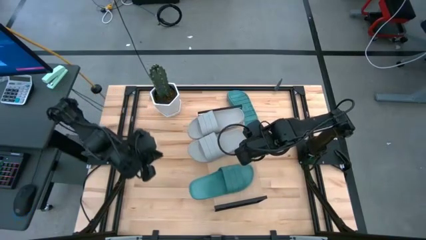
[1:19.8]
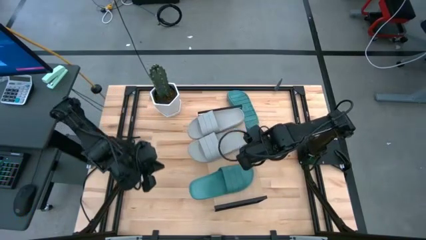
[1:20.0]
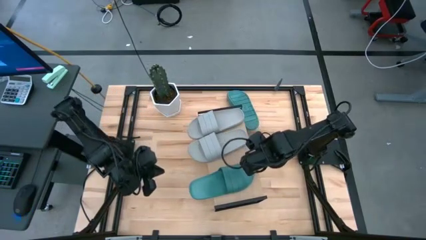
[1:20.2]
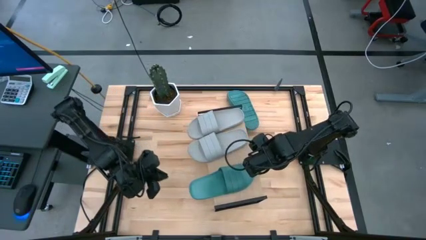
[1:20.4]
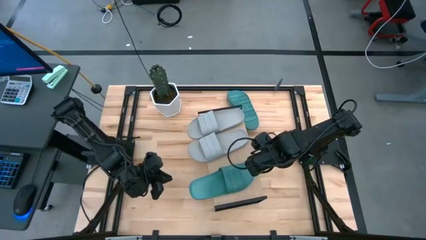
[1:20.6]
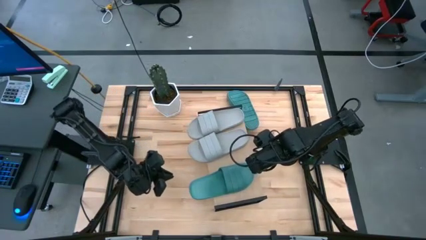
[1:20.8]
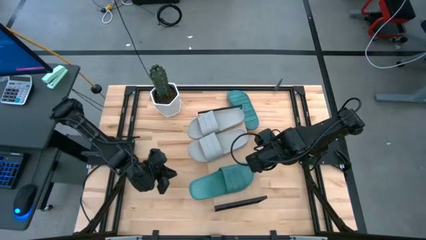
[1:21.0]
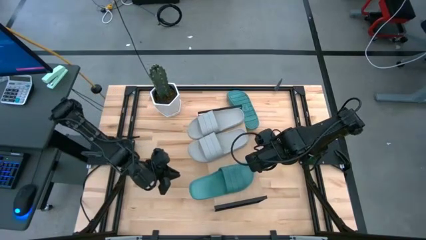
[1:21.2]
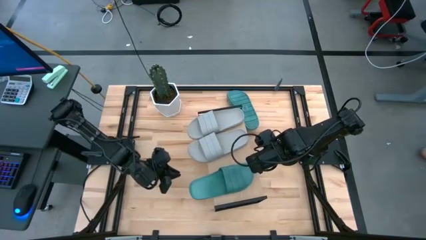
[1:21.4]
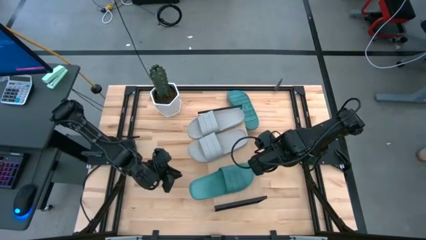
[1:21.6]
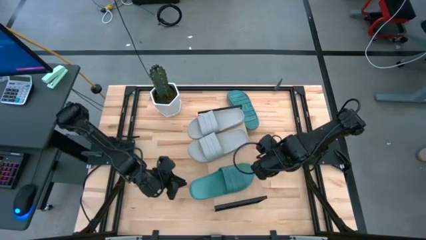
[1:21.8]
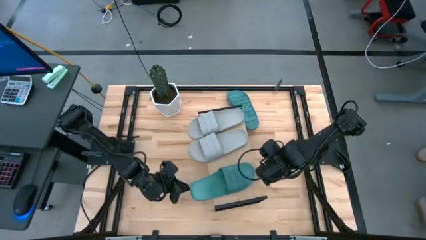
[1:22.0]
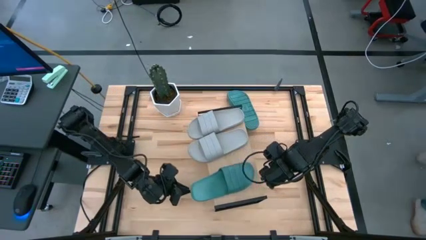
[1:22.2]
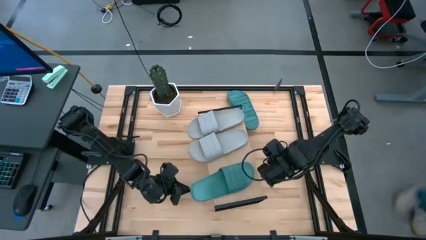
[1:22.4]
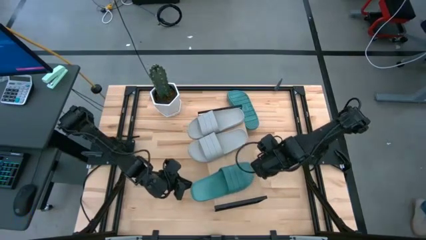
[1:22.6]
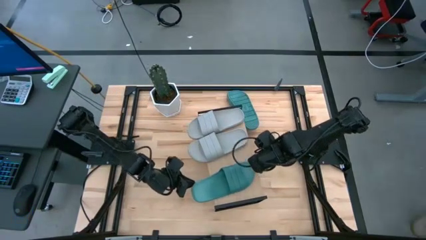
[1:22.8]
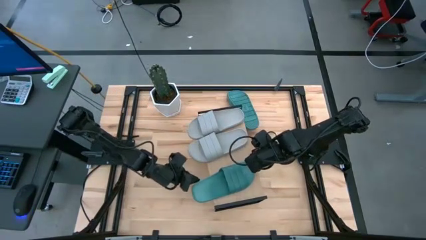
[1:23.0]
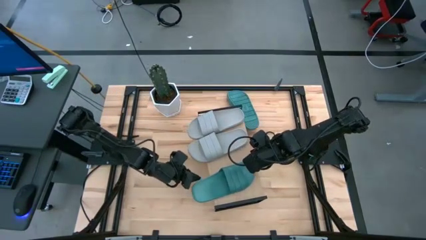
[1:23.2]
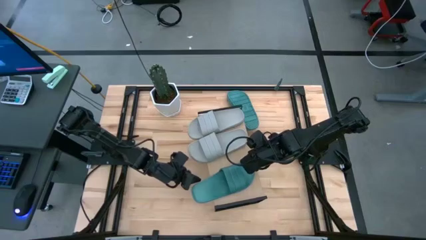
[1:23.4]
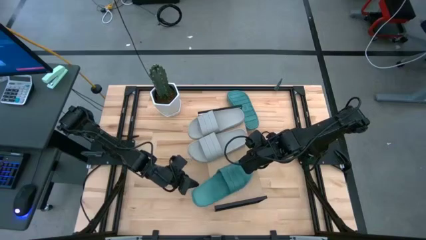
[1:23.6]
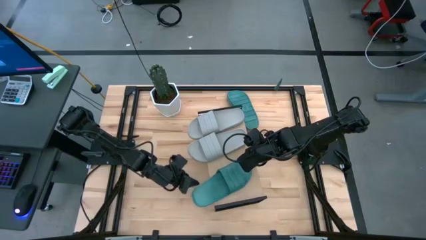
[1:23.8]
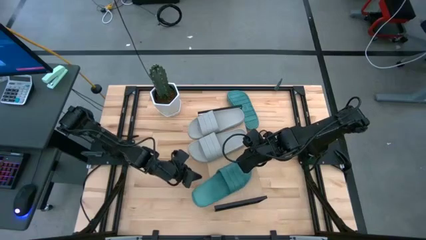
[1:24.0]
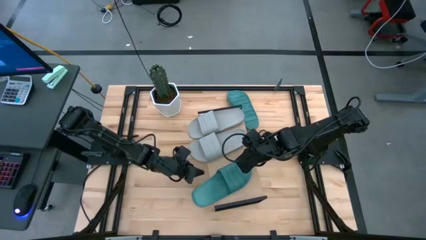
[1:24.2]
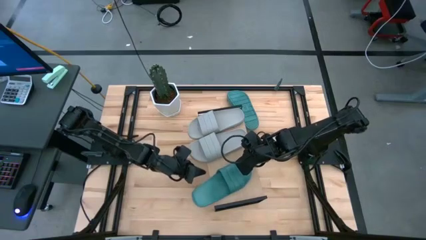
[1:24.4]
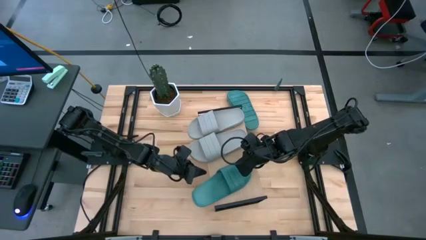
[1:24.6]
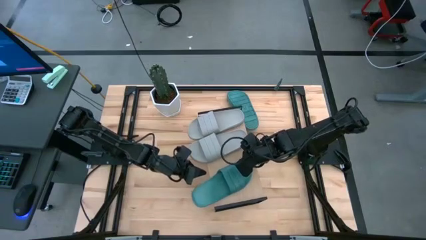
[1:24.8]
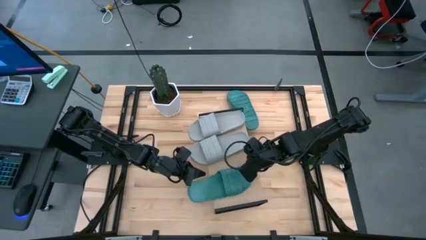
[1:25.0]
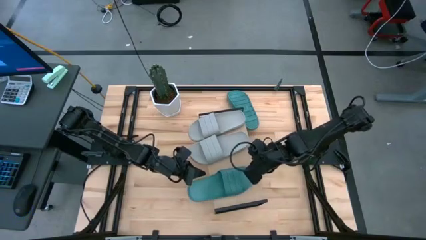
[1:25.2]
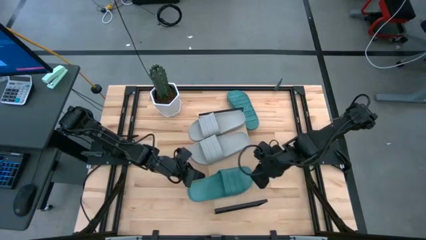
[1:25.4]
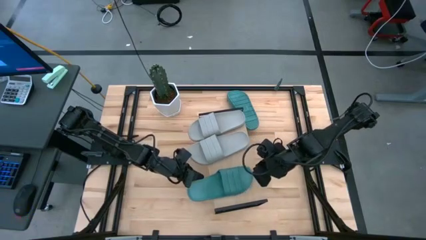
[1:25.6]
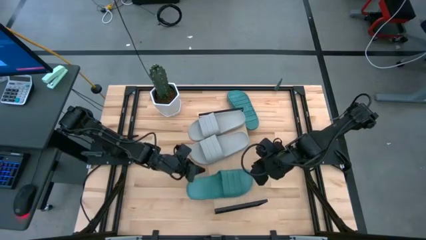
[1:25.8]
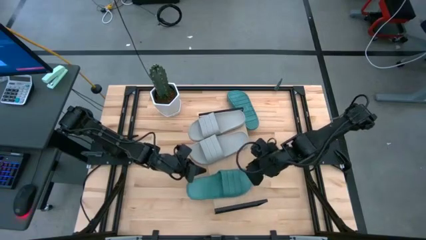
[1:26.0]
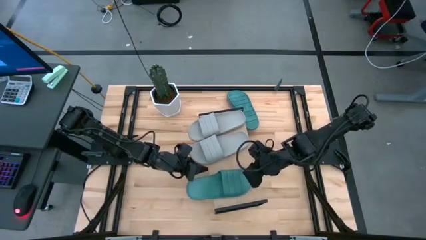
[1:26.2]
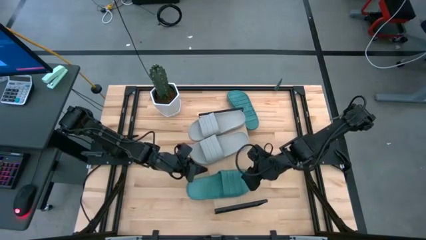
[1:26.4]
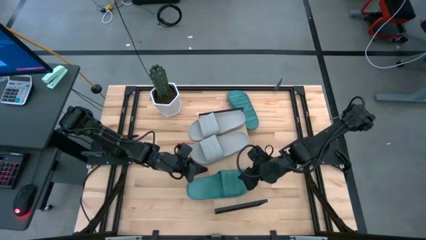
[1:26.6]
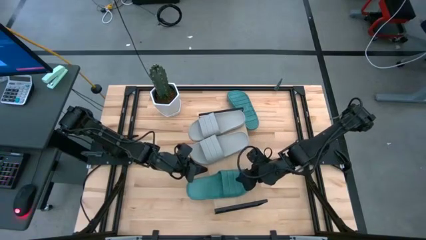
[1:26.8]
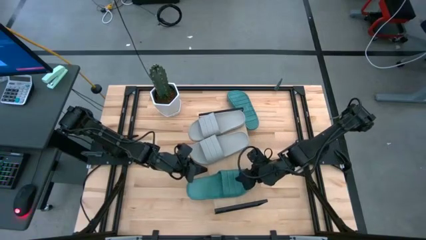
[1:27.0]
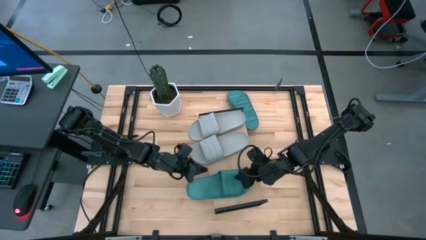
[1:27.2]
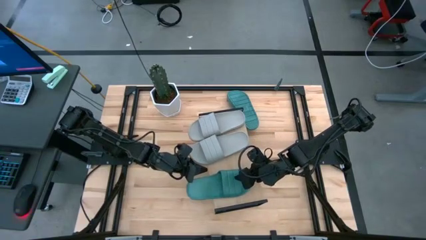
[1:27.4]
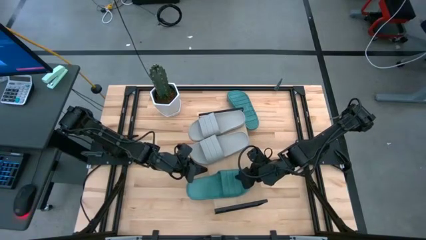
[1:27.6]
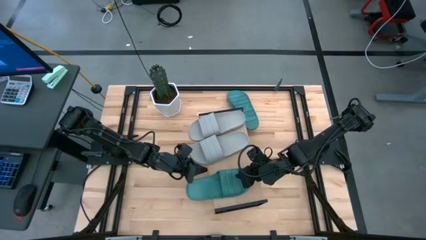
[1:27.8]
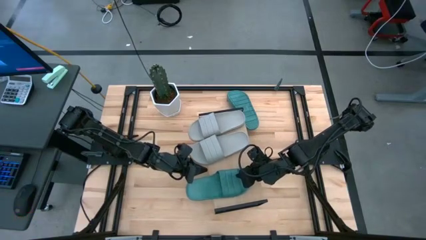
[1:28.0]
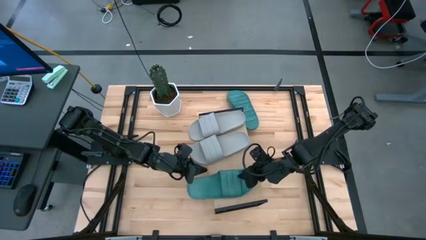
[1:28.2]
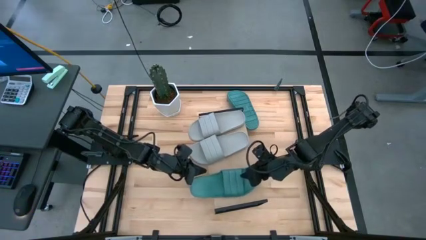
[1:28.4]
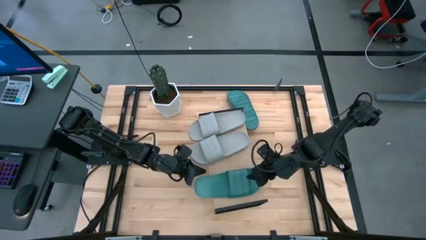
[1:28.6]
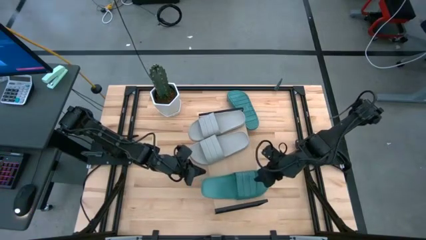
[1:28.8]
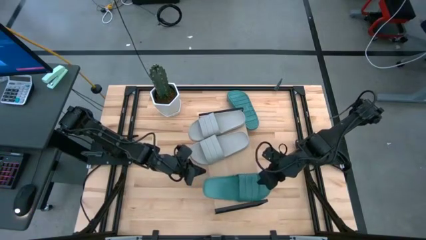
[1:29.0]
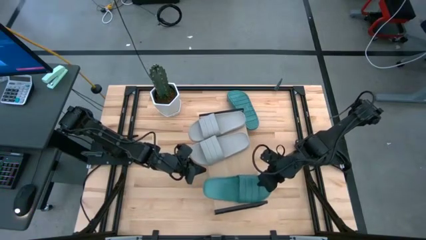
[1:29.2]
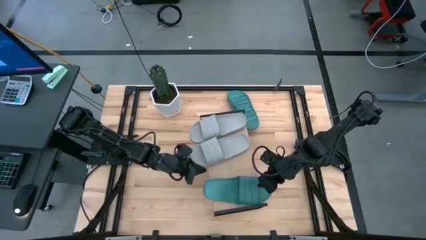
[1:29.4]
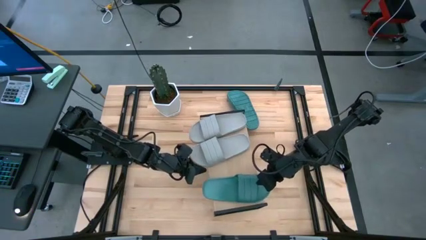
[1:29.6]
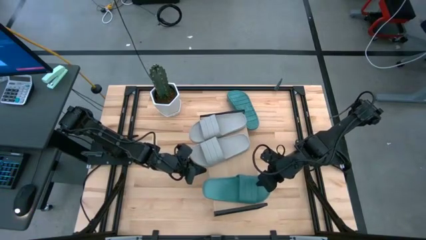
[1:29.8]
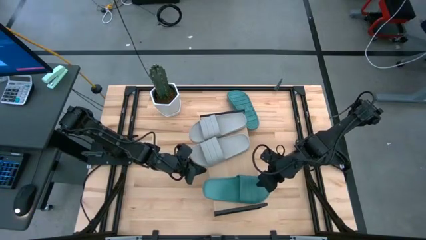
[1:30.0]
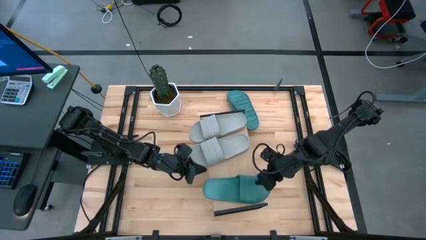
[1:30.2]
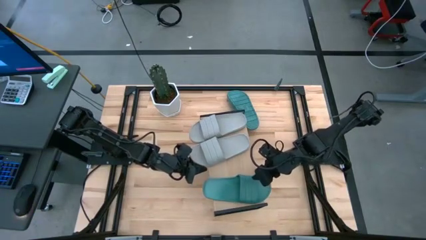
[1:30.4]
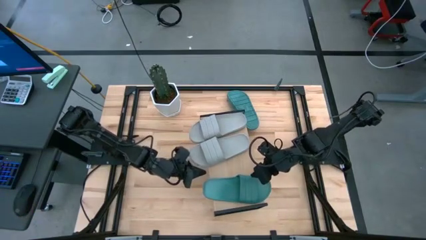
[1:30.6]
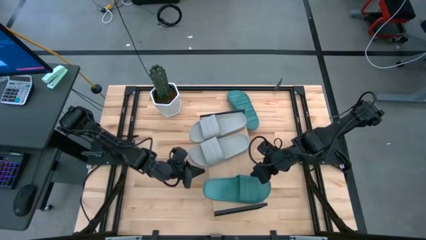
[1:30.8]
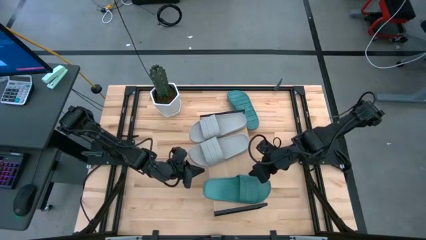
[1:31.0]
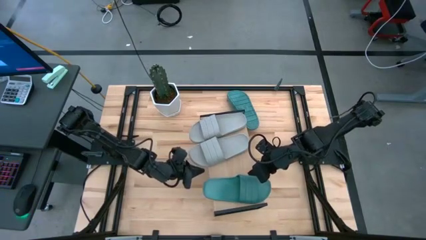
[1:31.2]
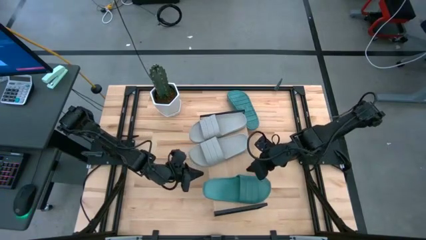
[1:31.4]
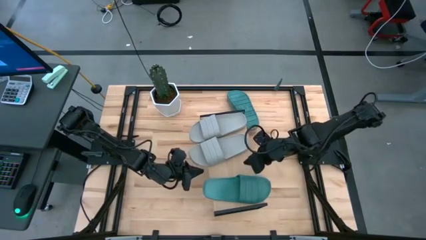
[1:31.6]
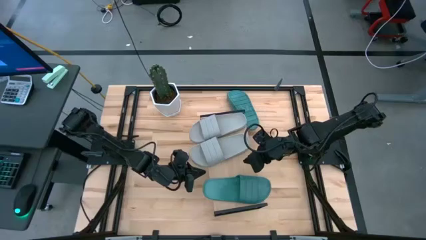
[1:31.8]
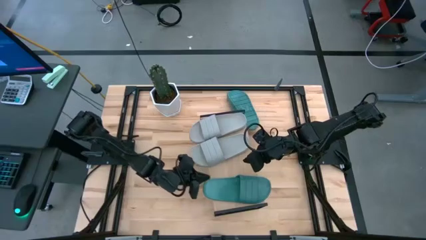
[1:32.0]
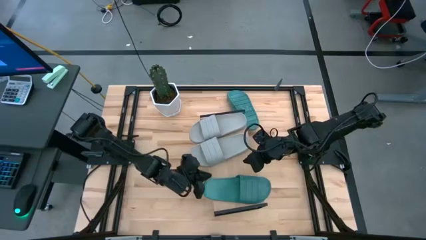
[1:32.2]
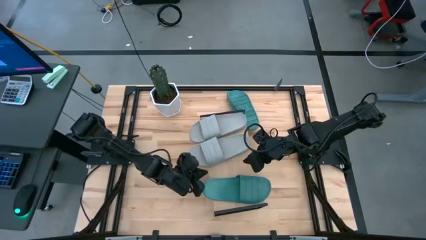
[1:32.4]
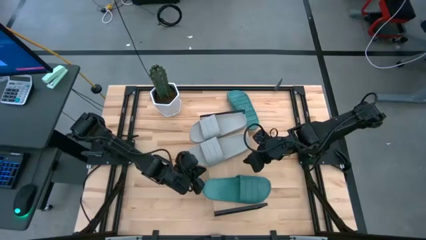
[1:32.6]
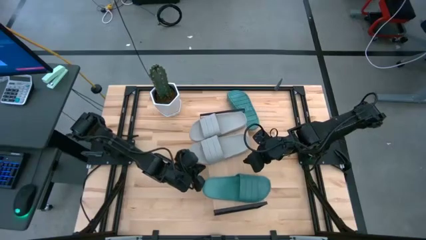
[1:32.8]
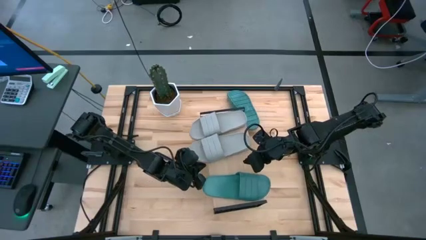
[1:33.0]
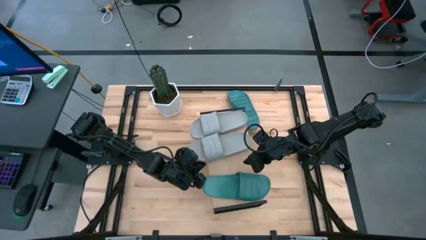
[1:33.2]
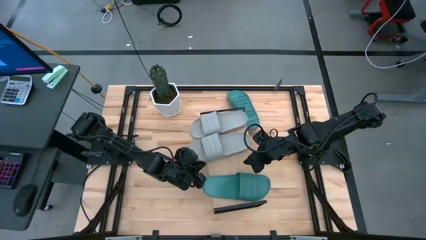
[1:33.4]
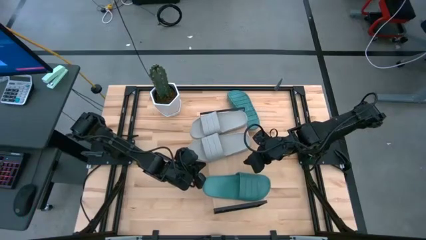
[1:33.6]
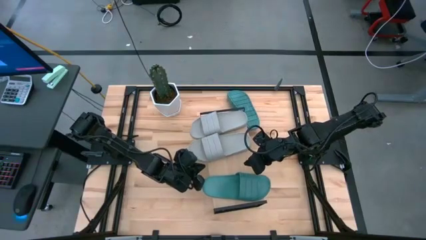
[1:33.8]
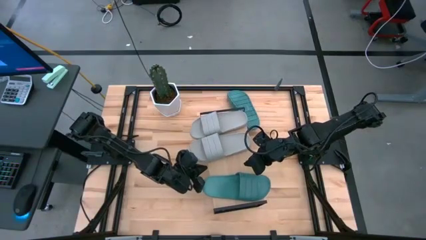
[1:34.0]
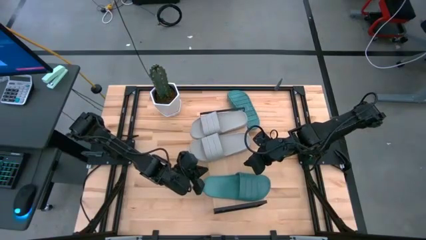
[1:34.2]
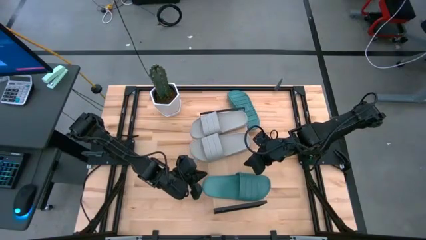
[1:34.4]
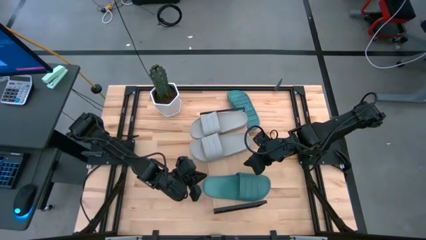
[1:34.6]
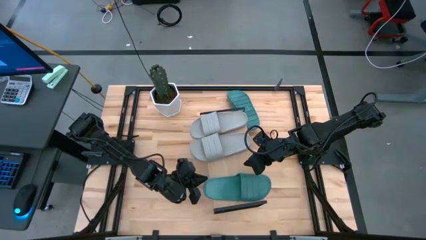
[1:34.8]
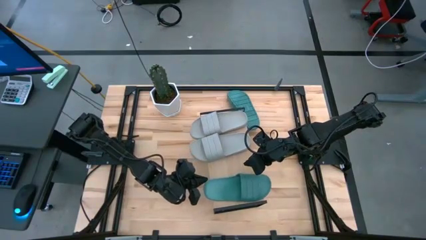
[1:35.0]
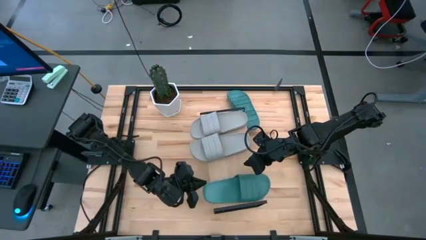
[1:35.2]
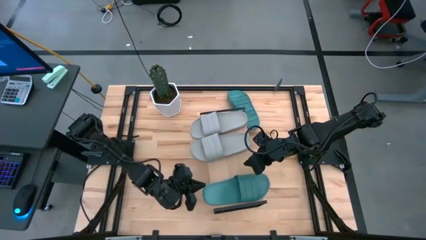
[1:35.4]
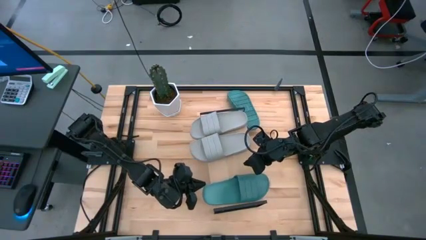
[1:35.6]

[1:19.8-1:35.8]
Task: Pick and place slides into the shelf
Put the bottom green slipper on the shelf
